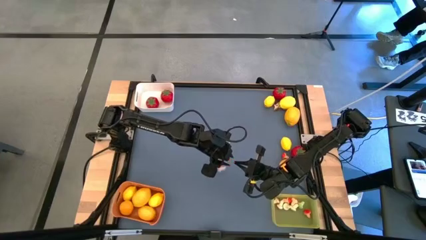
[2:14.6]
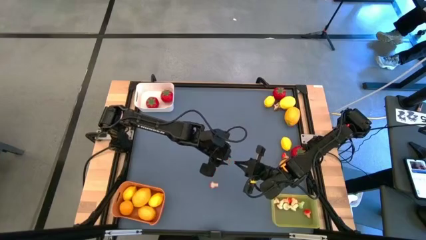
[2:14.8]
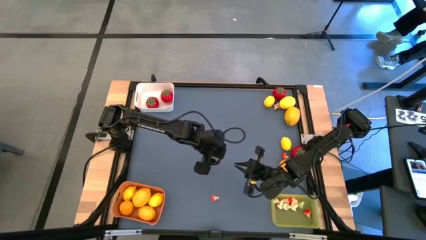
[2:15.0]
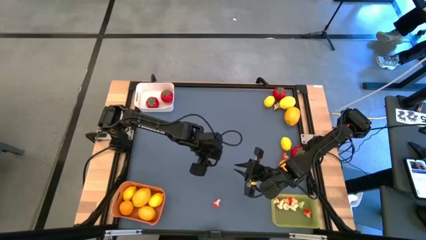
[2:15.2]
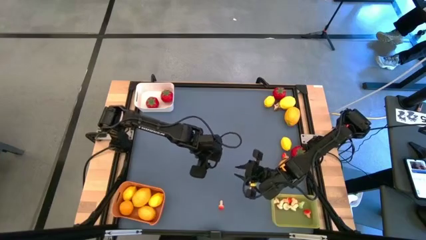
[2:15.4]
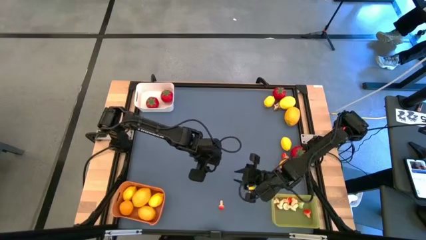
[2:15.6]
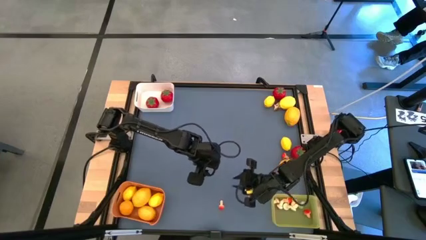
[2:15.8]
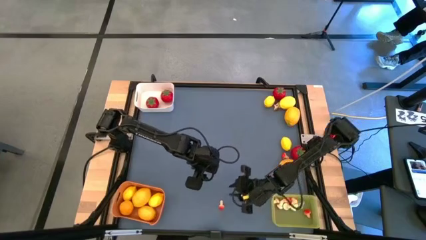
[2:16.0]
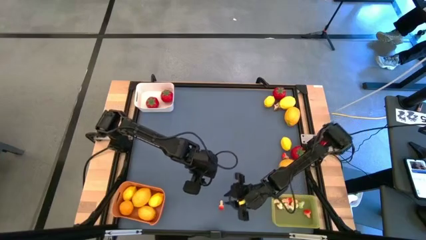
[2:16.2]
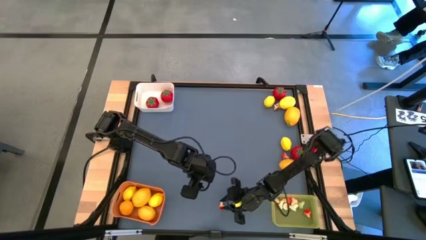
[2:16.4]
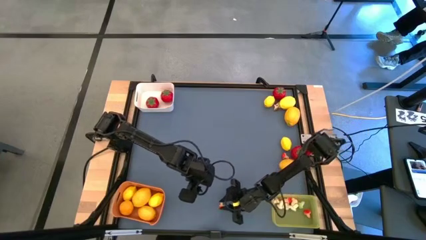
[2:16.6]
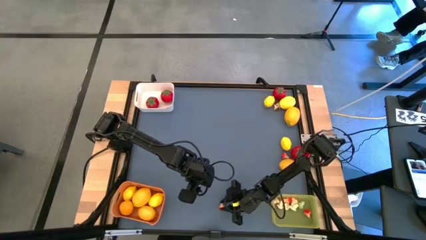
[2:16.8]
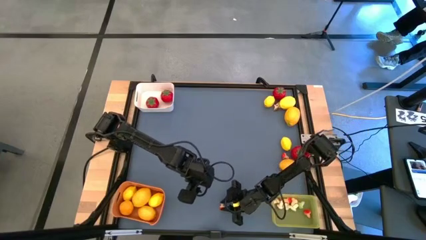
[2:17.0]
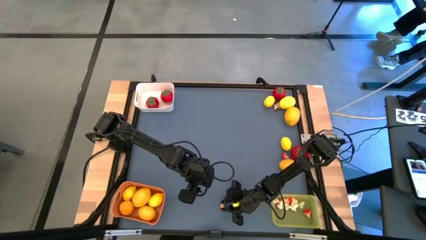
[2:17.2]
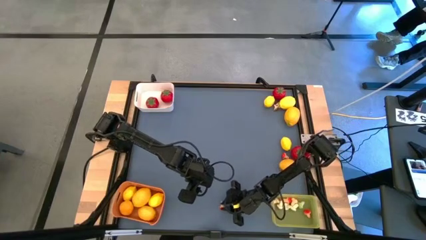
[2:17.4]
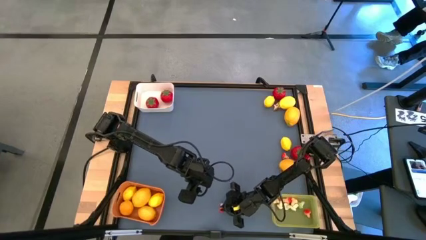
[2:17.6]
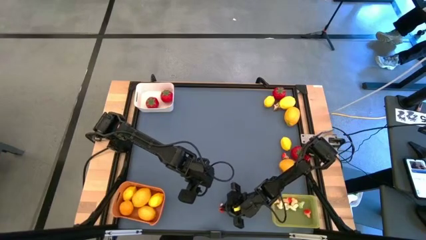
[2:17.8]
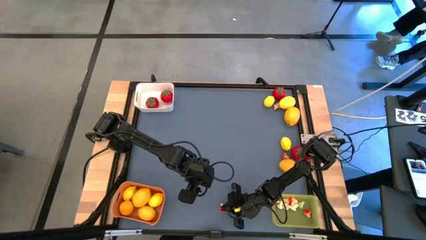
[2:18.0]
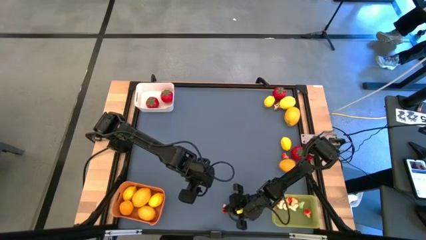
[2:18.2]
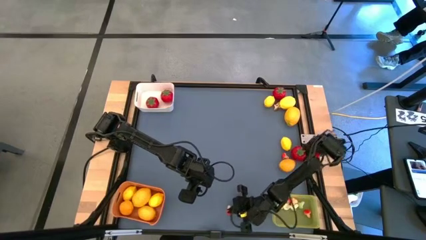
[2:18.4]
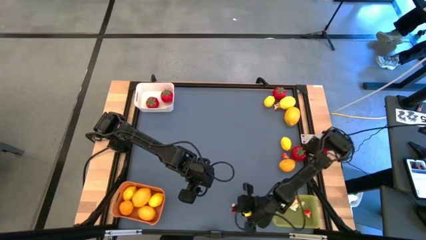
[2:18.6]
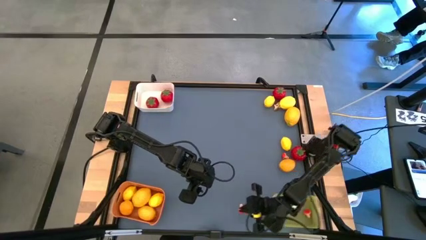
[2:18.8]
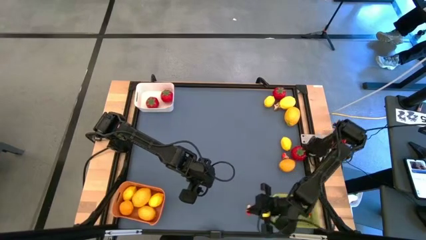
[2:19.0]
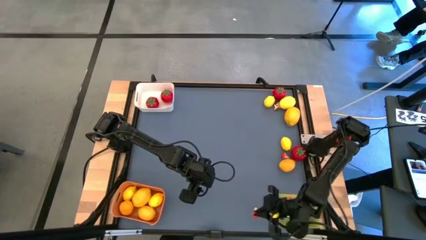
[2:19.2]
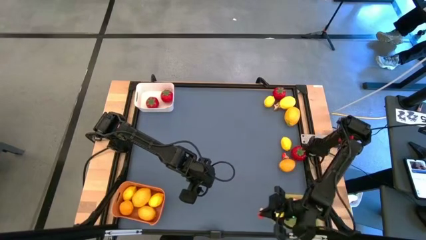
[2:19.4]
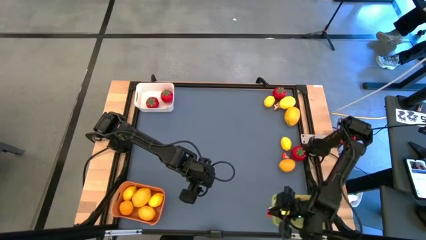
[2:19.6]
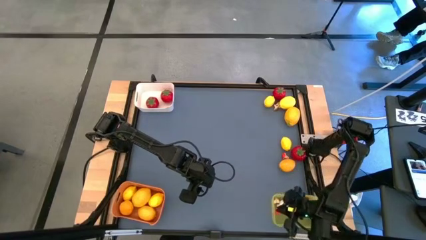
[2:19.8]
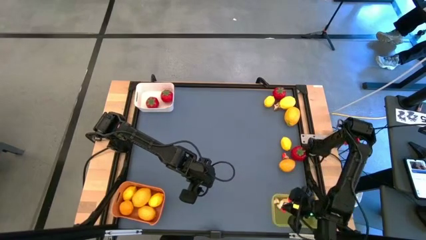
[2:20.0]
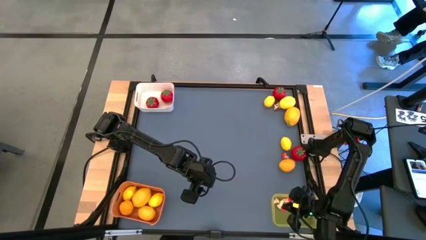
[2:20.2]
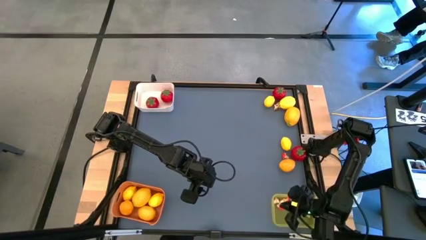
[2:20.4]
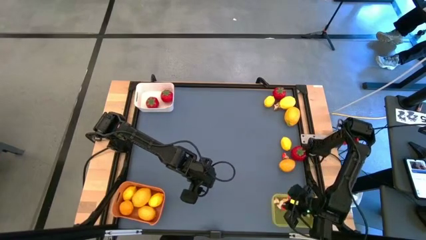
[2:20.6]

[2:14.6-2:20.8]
Task: Sort produce into baskets
Put the red mushroom into the yellow bin

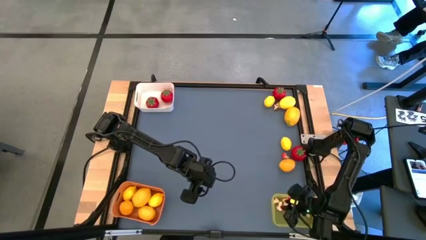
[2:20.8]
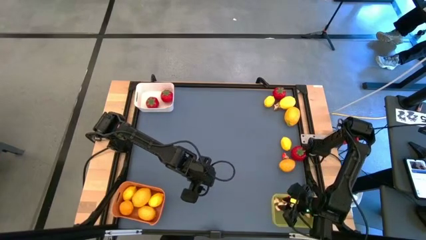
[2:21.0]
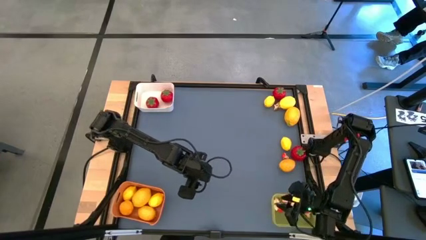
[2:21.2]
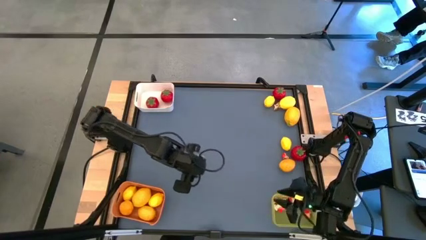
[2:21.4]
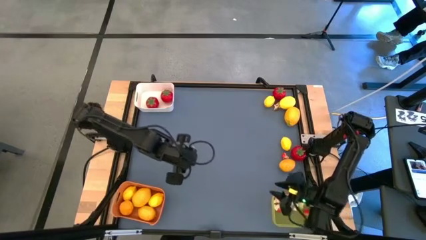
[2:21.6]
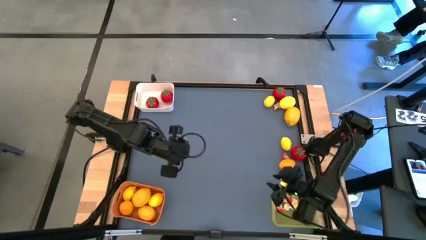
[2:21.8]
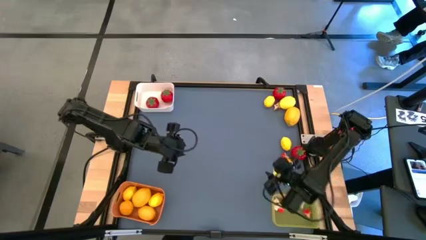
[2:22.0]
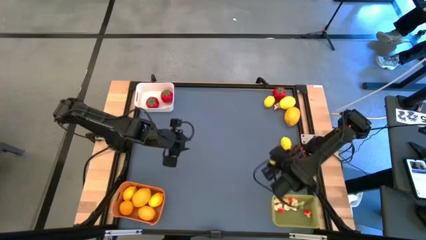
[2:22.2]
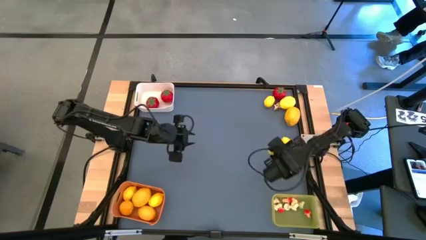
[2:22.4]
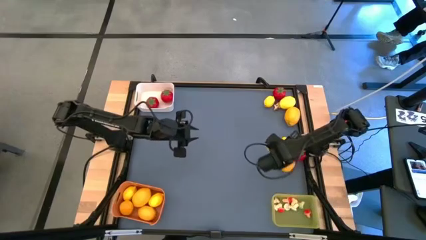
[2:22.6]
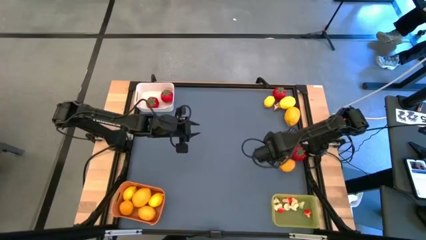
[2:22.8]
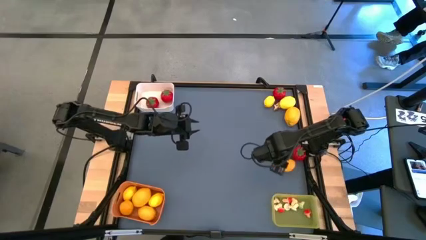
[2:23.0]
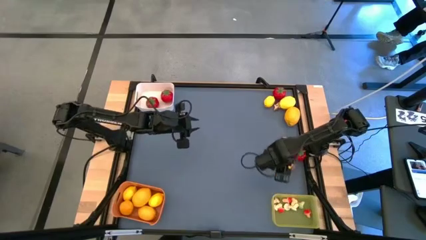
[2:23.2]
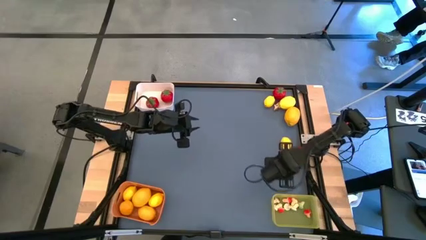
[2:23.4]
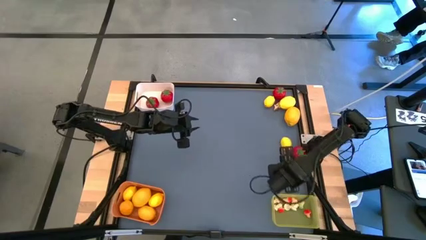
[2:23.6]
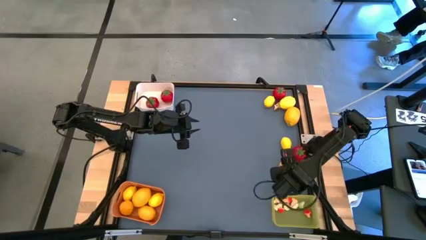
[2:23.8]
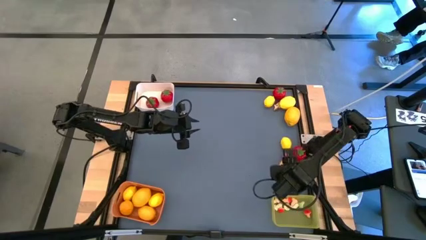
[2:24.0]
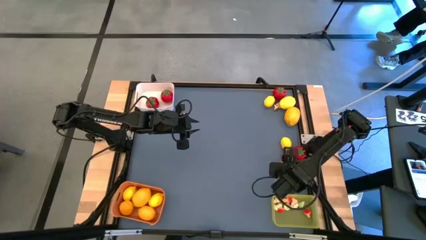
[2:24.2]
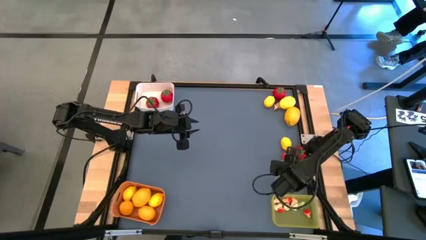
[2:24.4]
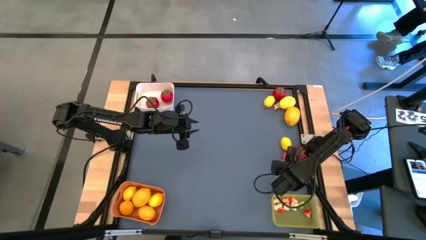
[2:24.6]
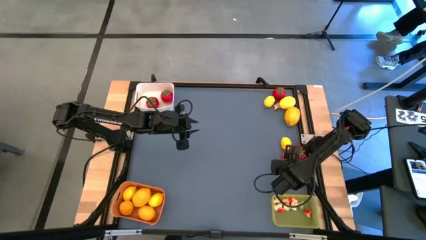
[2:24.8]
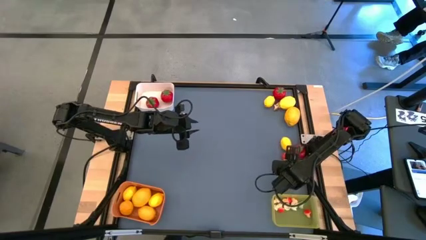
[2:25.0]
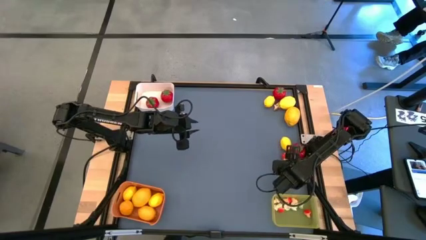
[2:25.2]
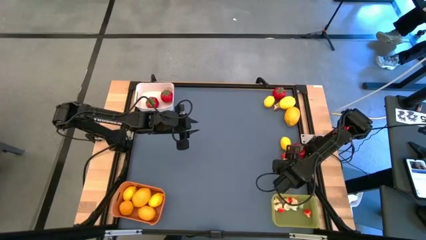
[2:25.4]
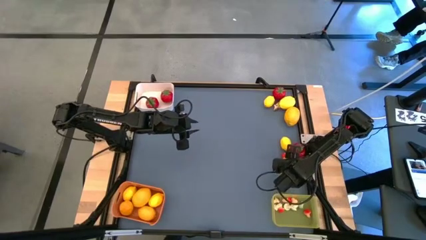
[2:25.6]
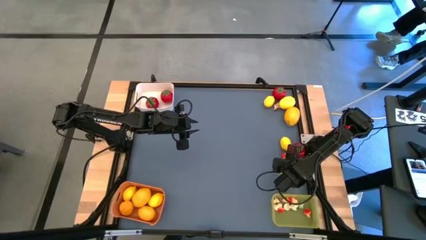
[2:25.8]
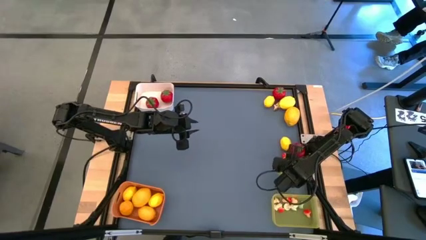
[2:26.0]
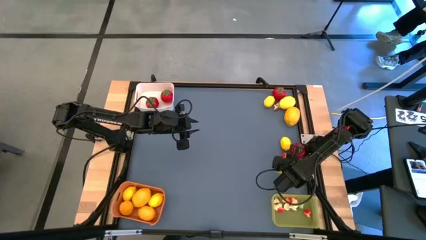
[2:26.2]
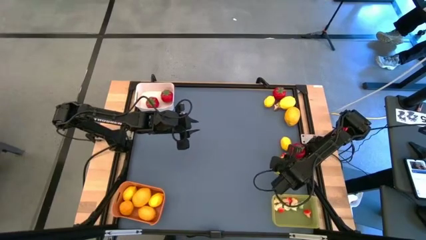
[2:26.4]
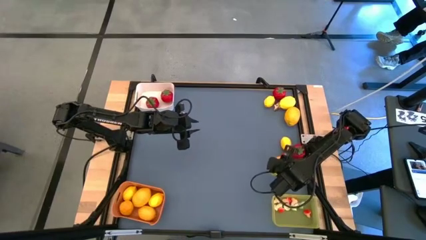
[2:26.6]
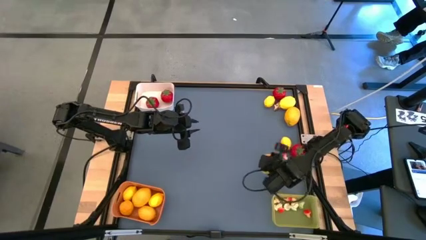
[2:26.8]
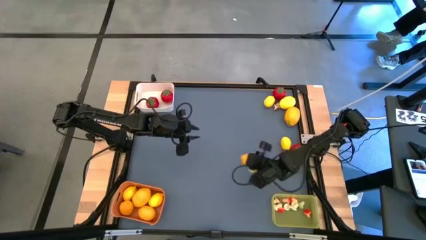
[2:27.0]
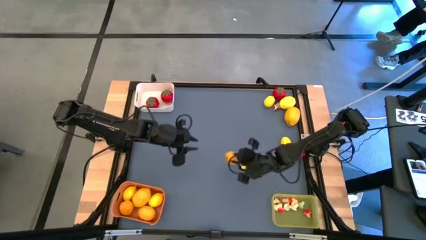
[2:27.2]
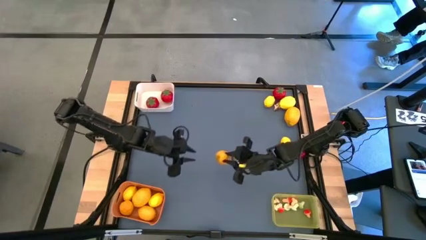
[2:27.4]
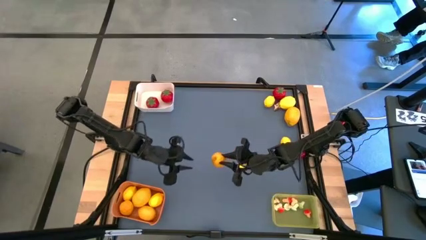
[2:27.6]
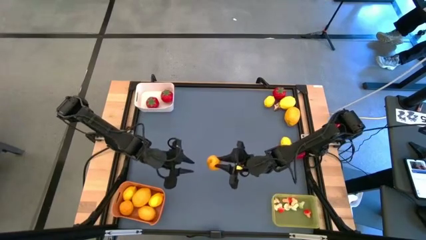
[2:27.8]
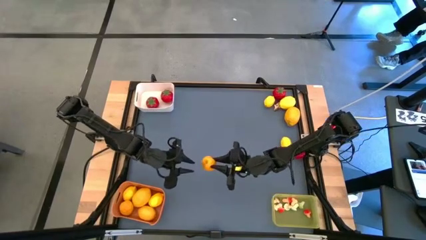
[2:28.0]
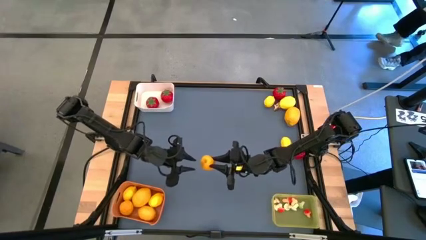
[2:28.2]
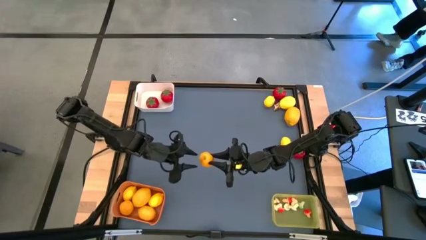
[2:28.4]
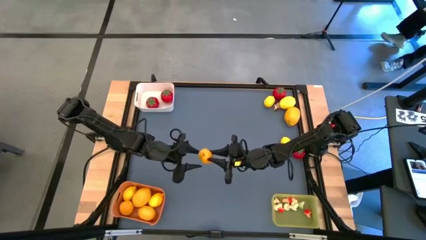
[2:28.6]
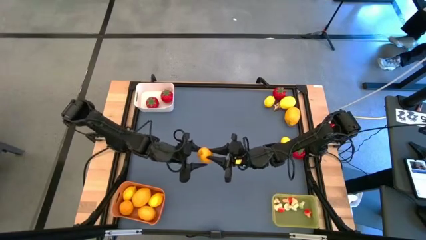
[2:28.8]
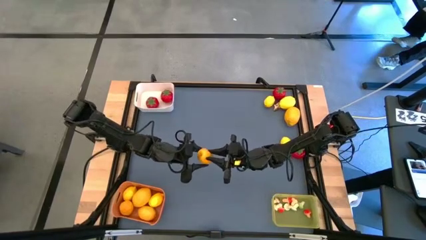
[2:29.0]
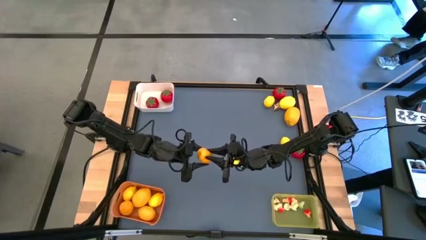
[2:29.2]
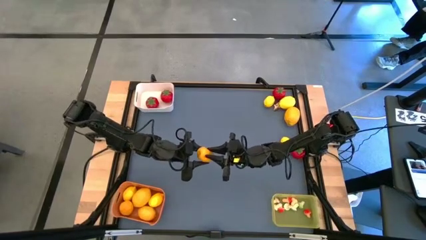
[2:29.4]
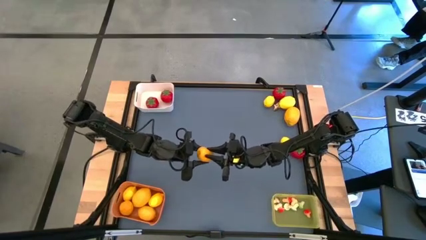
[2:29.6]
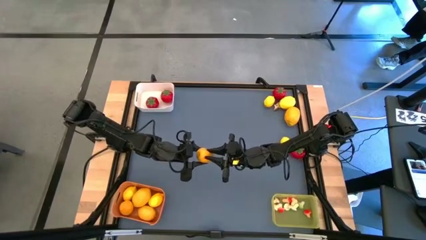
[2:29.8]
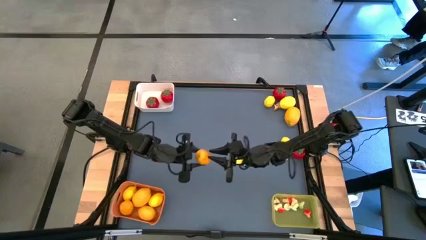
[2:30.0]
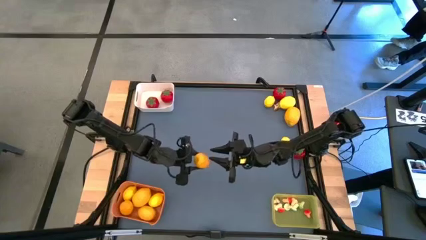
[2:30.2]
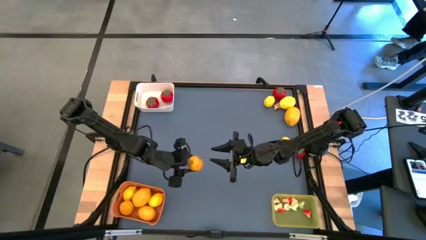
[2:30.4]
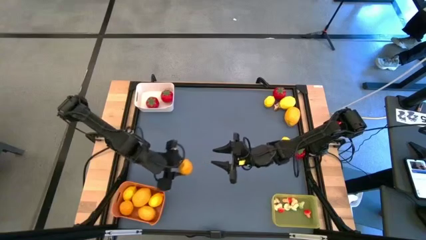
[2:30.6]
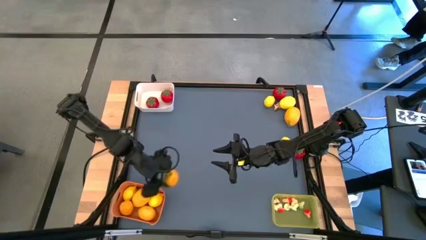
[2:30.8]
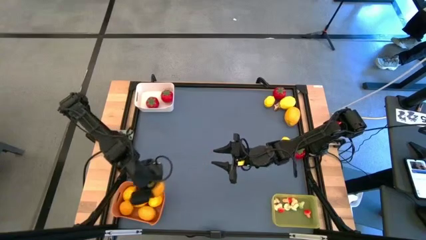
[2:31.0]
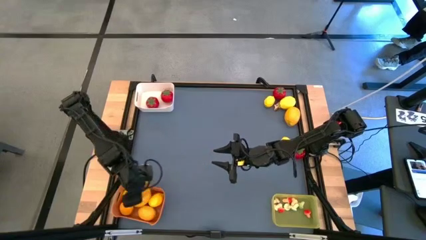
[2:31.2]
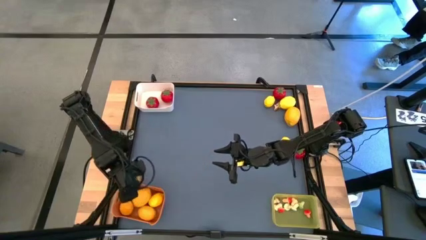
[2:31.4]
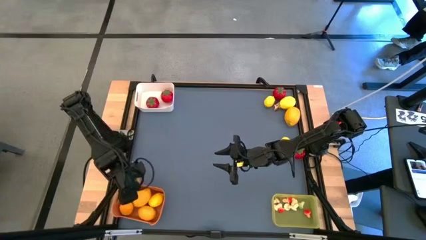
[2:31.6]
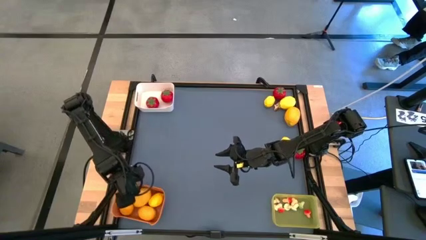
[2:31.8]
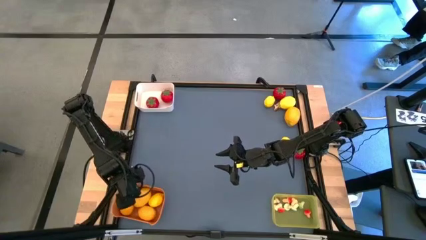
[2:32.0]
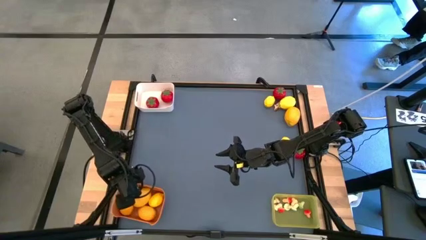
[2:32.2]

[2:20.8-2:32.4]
Put the yellow lemon into the orange bin
